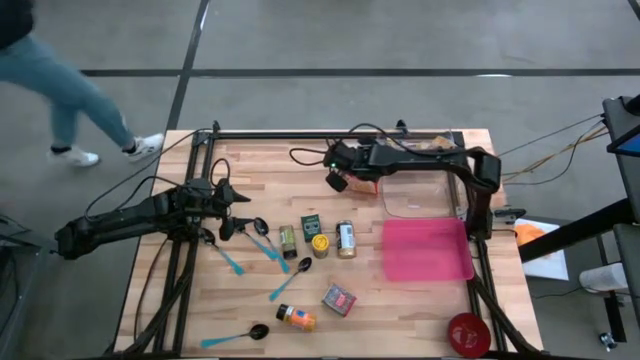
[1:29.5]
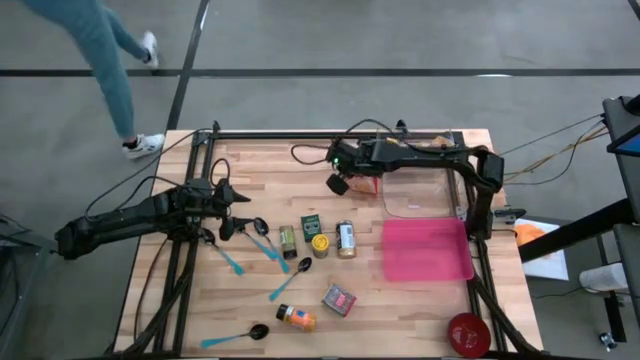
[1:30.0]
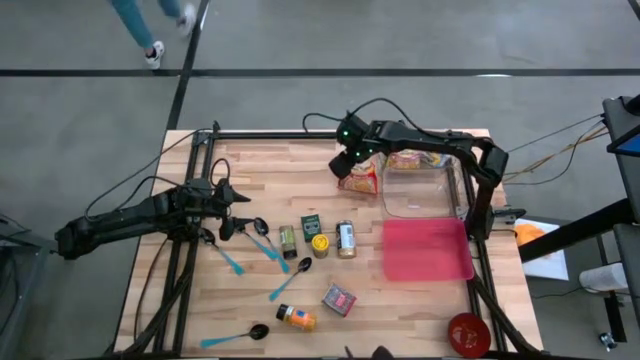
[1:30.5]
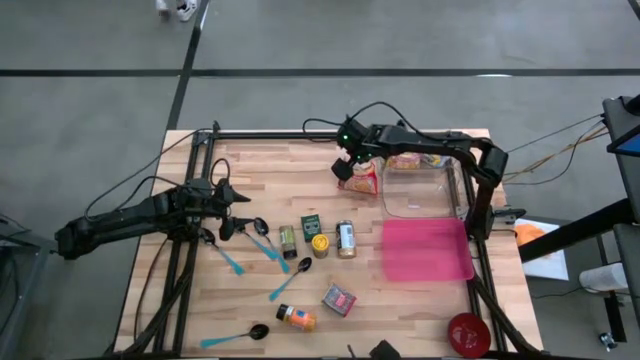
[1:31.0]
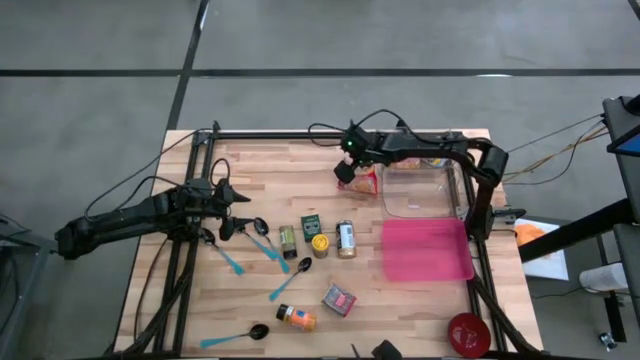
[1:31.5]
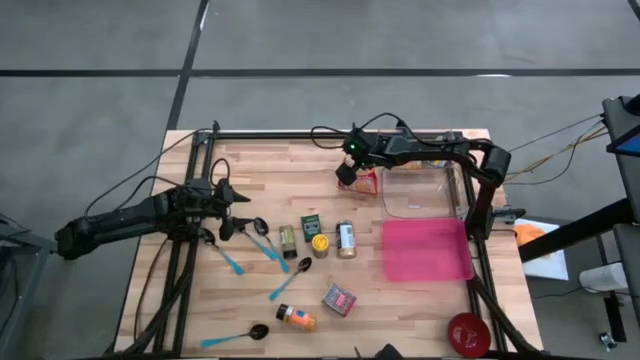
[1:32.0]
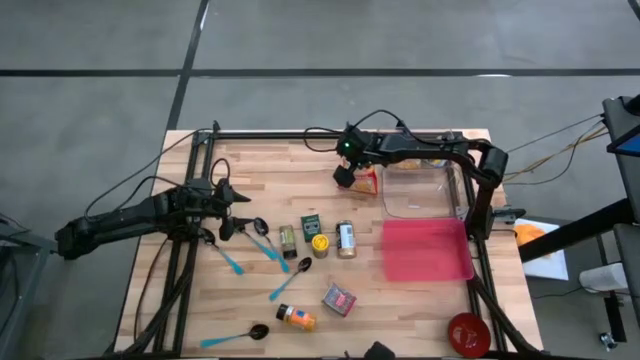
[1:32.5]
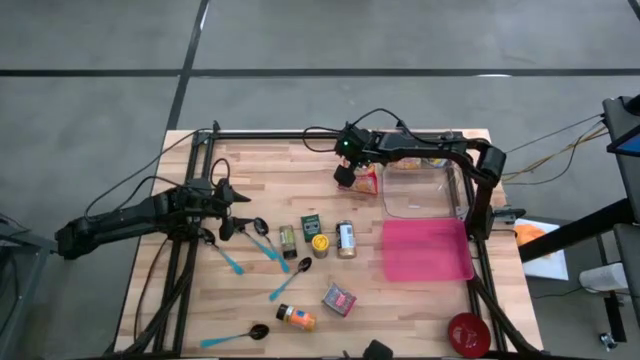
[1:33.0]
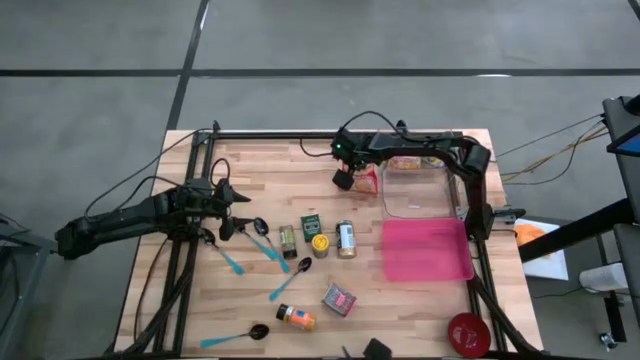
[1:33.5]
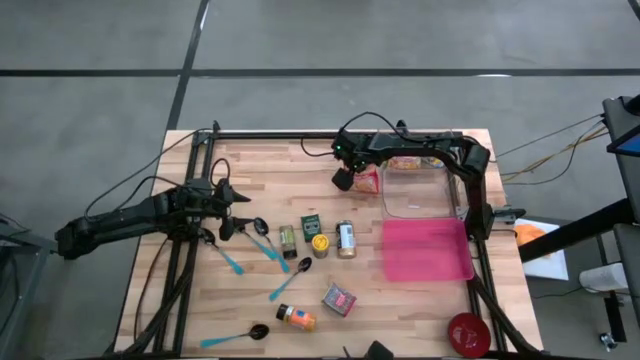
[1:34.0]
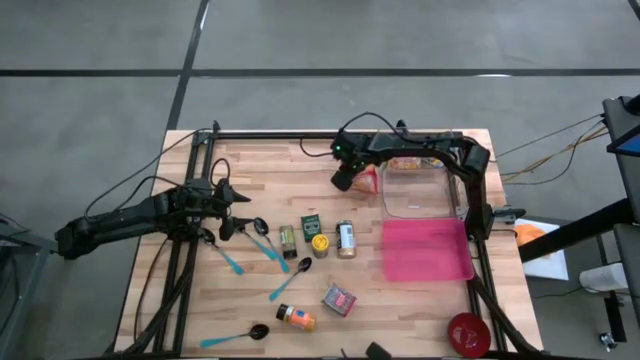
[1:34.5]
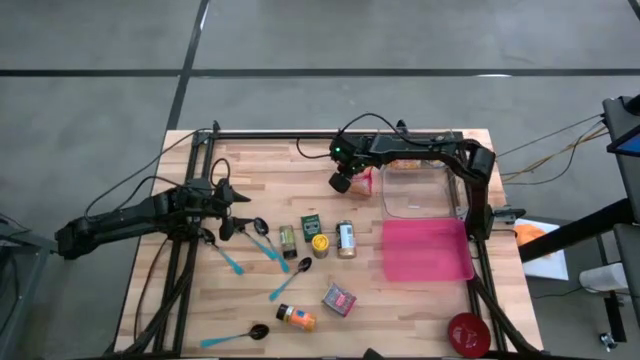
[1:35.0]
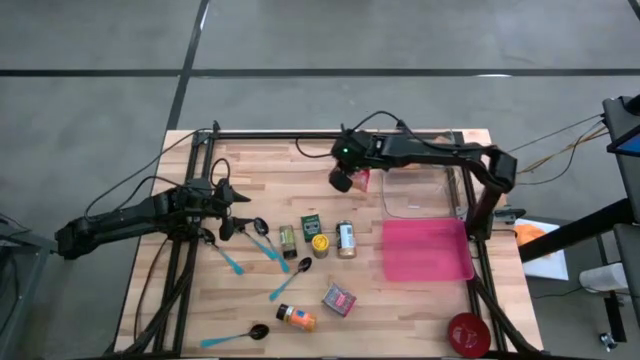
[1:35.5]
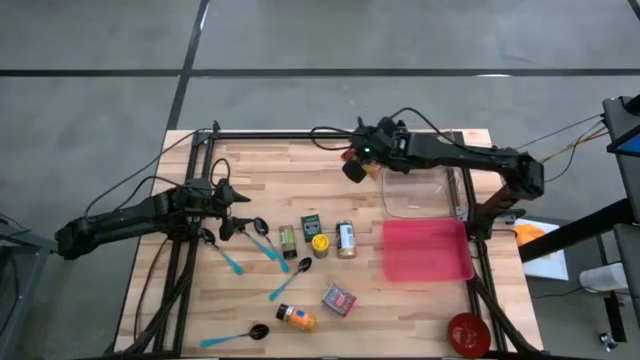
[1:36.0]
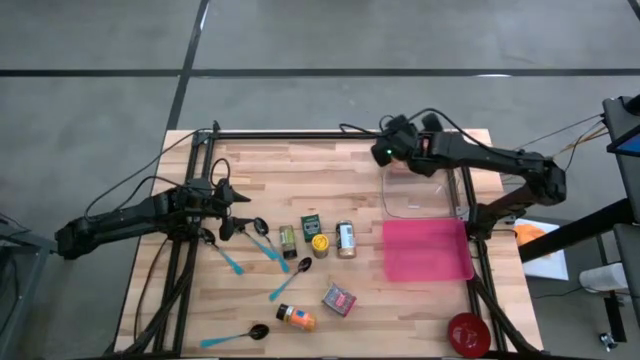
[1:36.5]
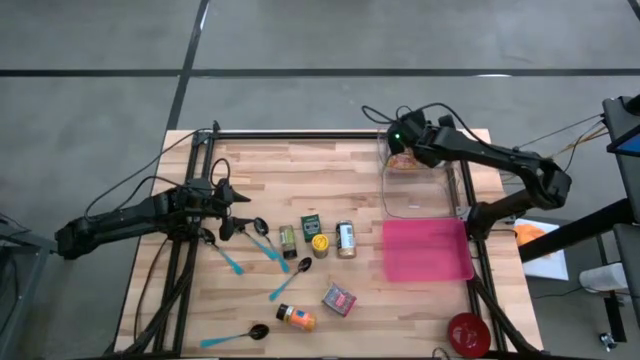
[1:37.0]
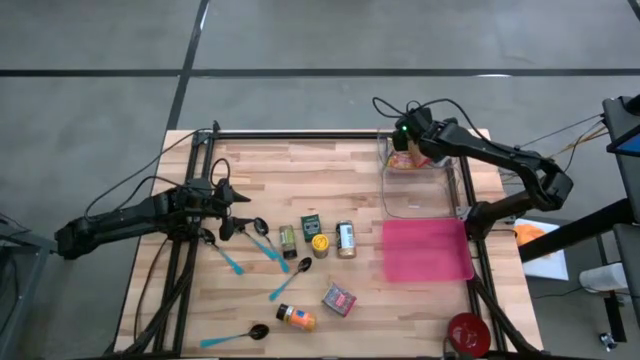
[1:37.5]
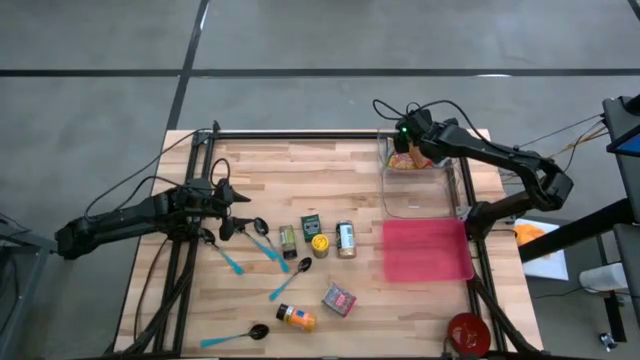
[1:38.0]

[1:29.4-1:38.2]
Put the red noodle pack into the top transparent bin

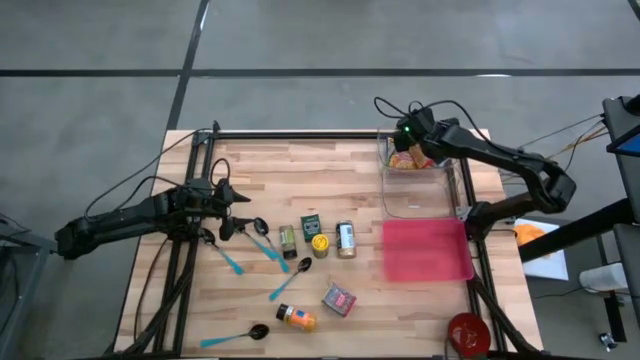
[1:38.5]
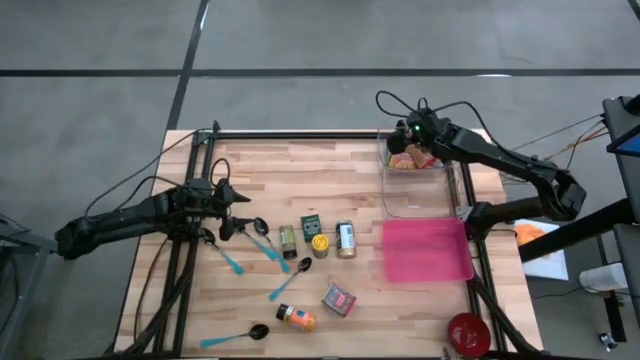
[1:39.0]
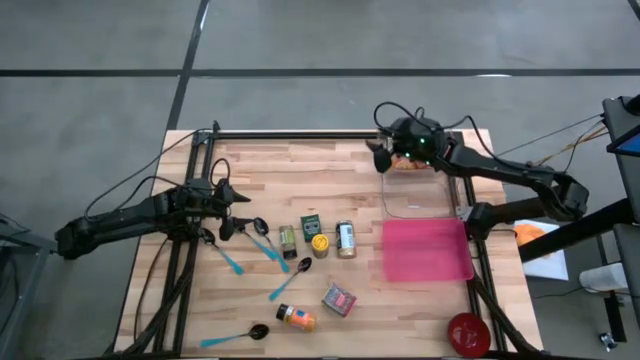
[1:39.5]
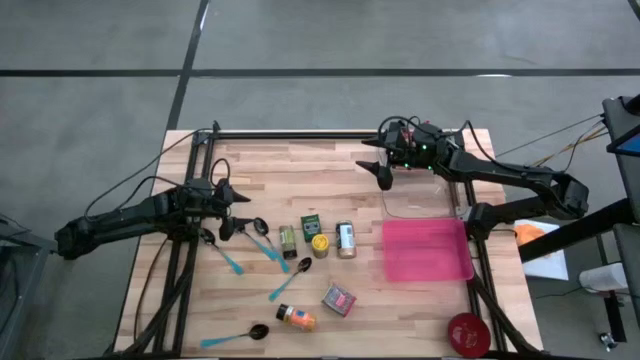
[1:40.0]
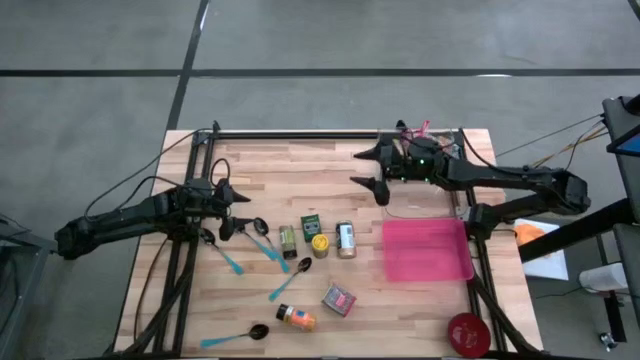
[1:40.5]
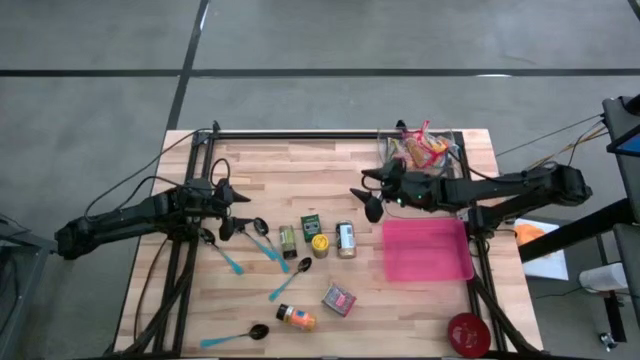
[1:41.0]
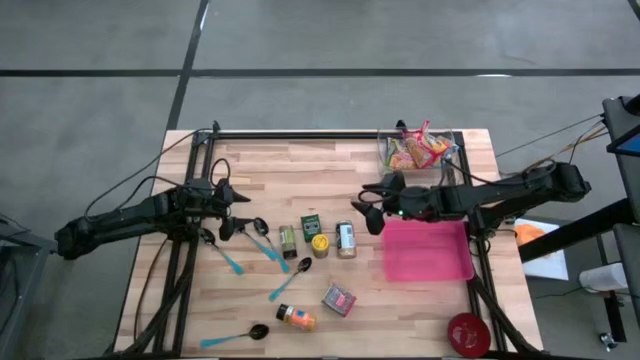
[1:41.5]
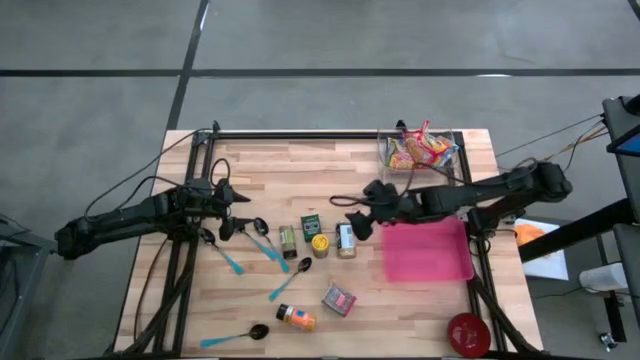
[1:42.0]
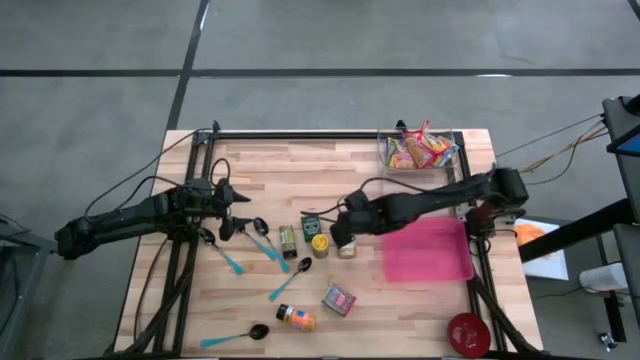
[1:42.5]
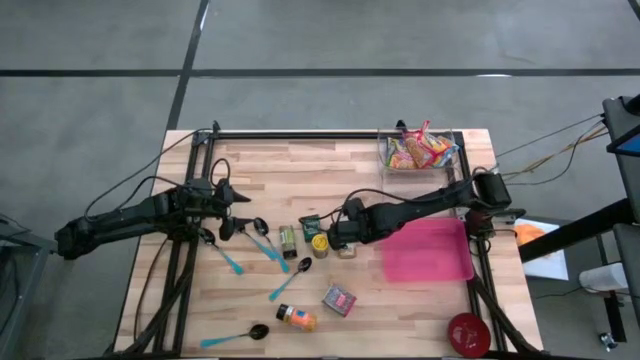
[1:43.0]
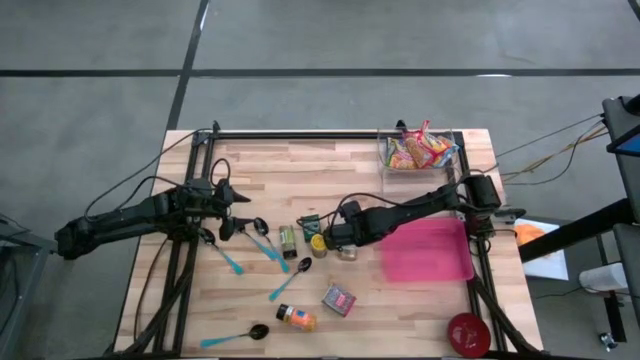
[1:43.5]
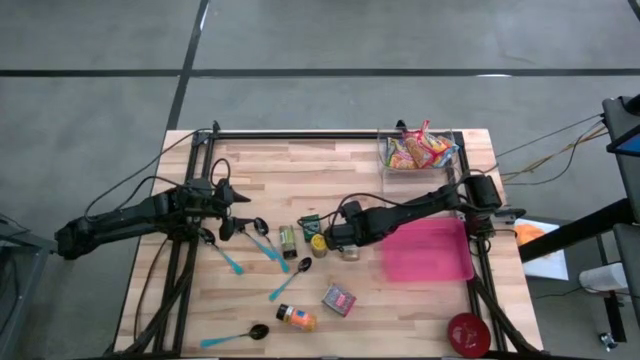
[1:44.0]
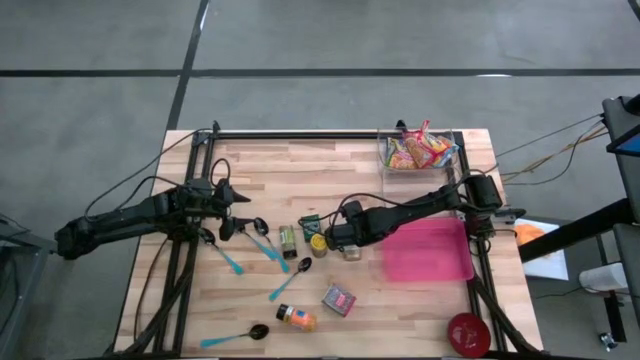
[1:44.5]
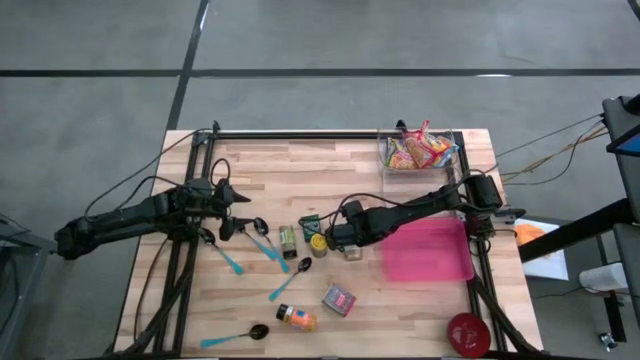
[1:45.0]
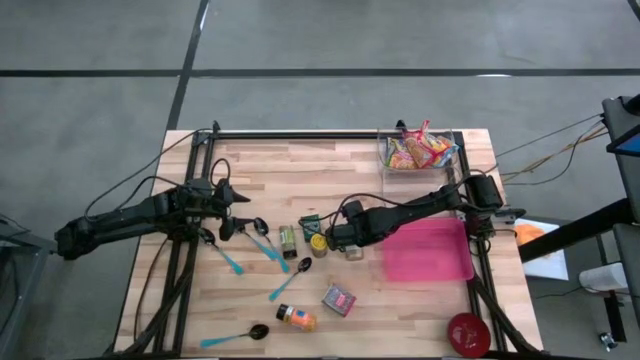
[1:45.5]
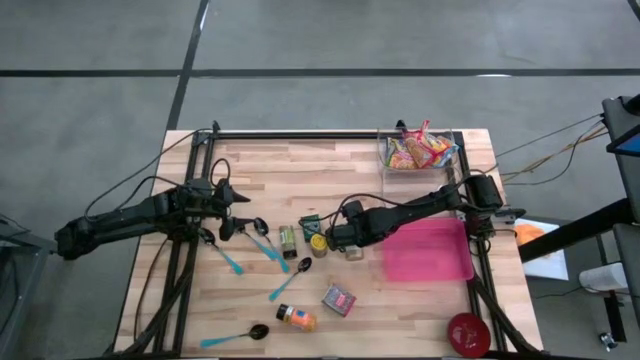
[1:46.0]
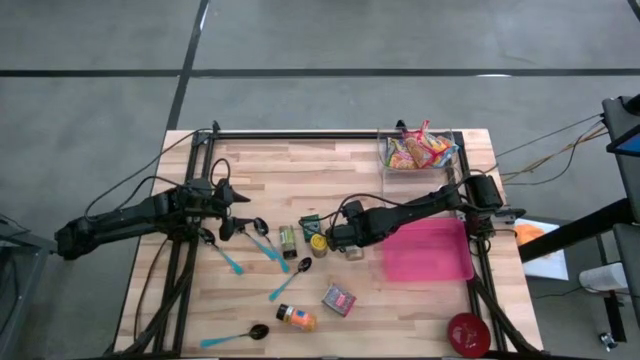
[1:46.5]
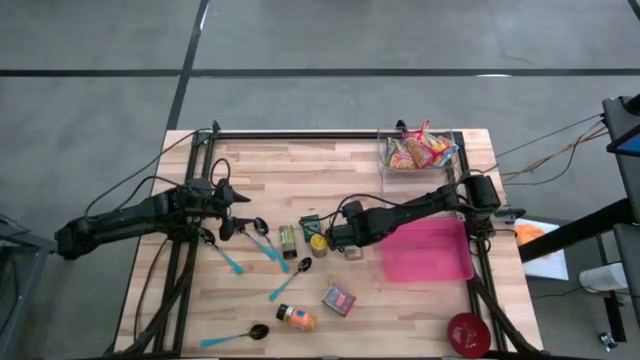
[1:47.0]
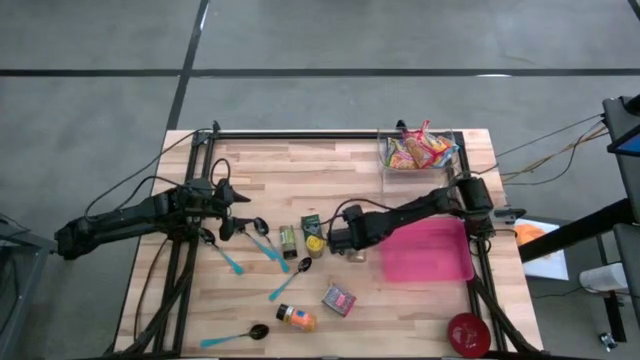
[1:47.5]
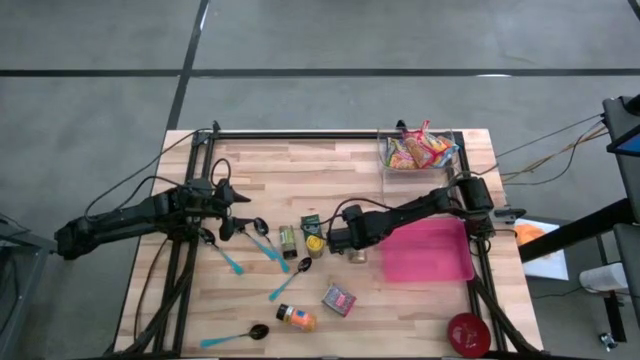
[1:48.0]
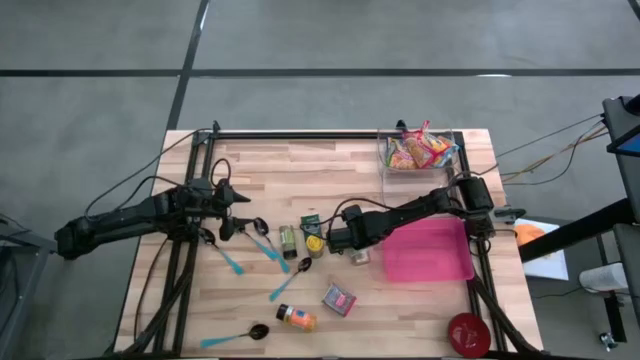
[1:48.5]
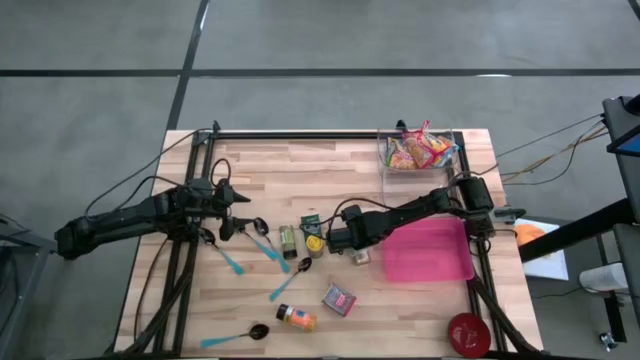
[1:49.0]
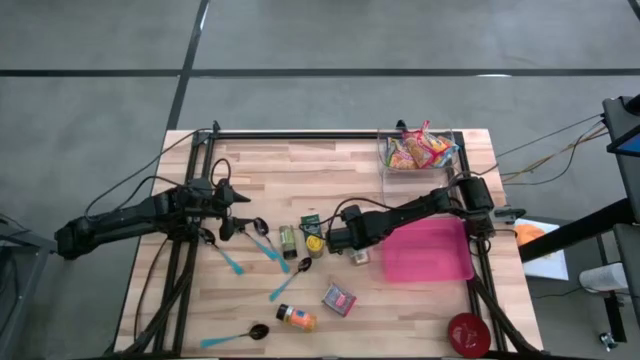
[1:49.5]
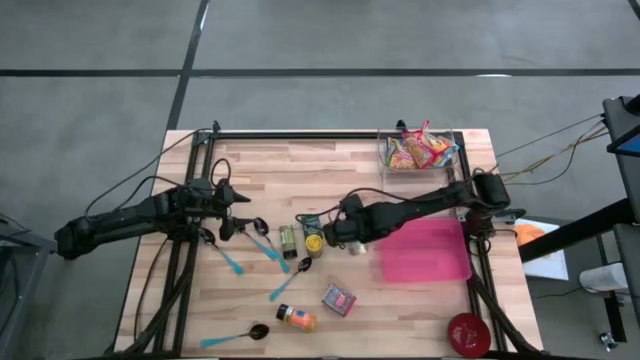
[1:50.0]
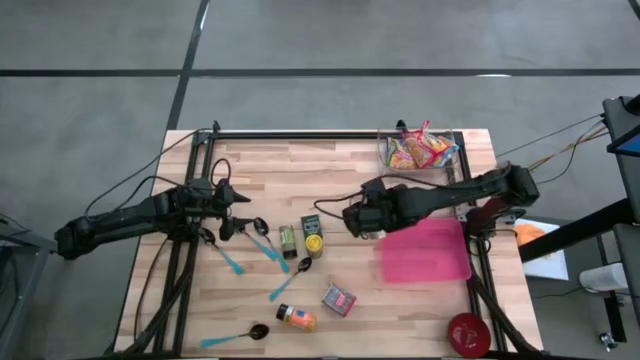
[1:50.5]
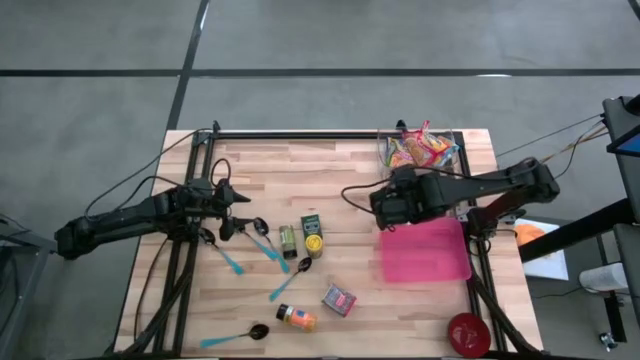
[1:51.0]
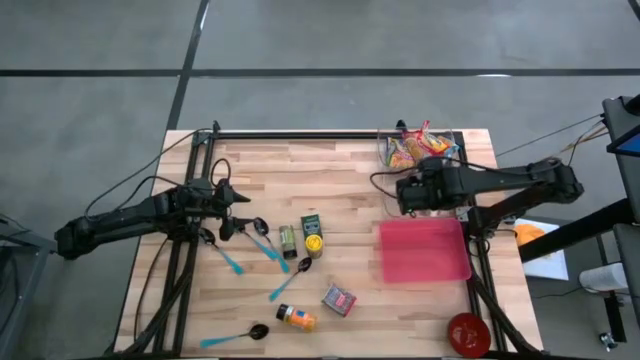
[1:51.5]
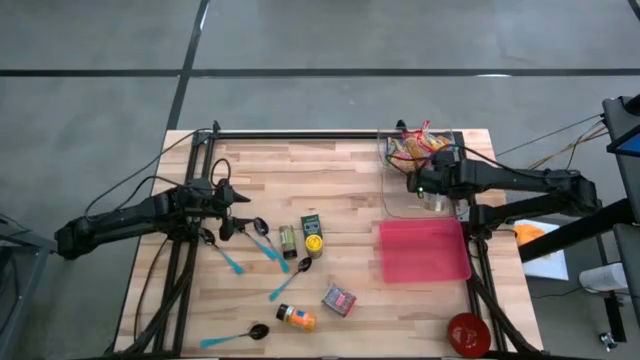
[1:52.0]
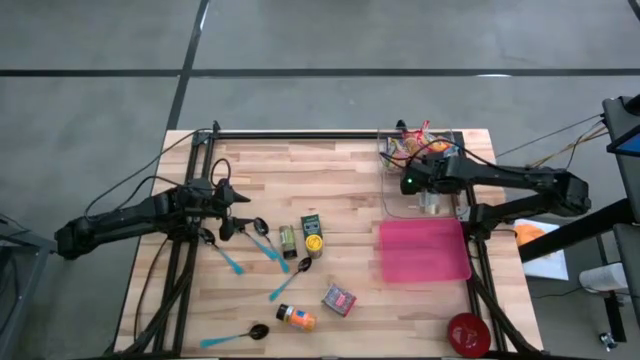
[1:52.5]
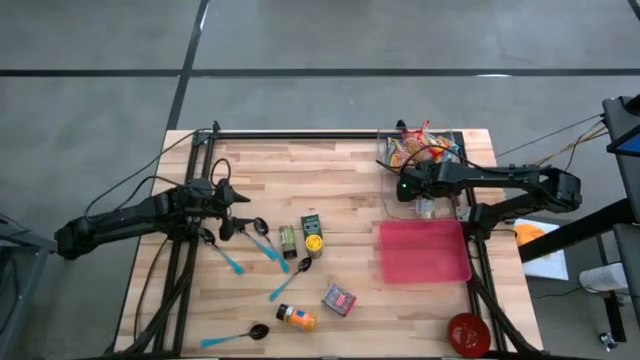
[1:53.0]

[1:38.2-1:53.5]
Put the gold seasoning bottle into the bottom transparent bin
